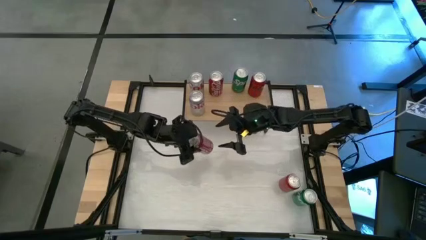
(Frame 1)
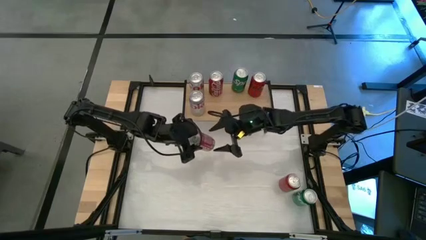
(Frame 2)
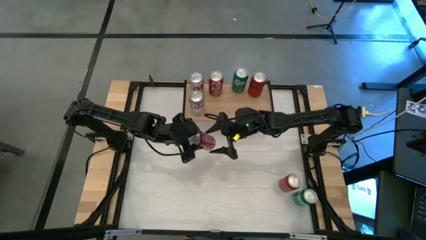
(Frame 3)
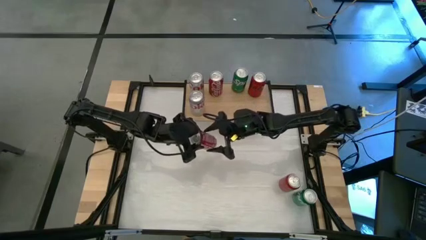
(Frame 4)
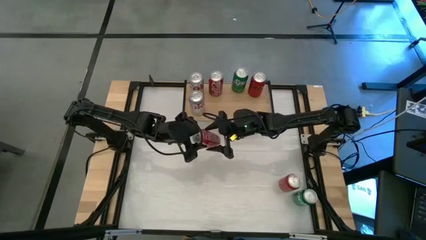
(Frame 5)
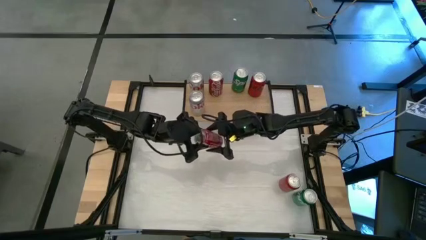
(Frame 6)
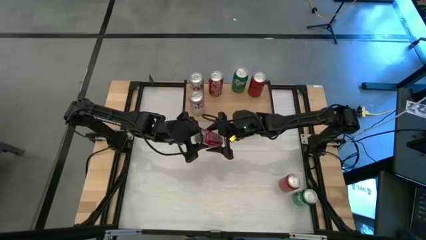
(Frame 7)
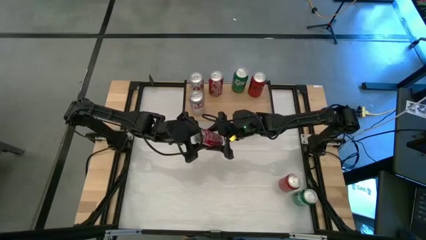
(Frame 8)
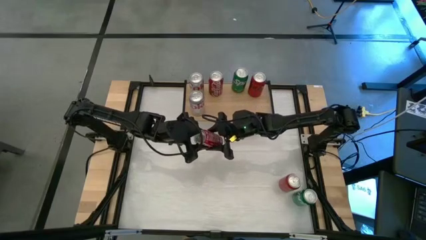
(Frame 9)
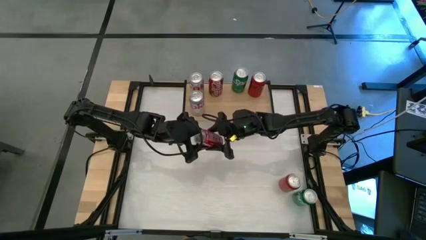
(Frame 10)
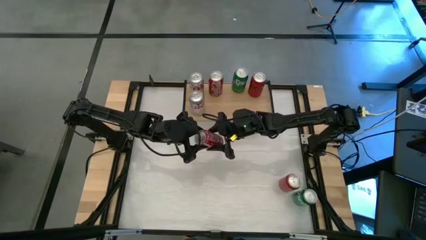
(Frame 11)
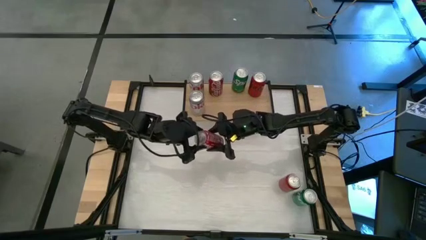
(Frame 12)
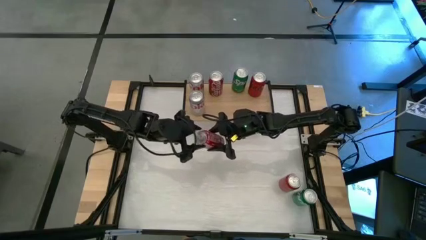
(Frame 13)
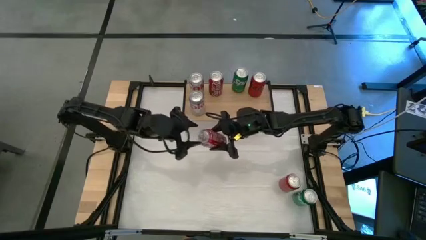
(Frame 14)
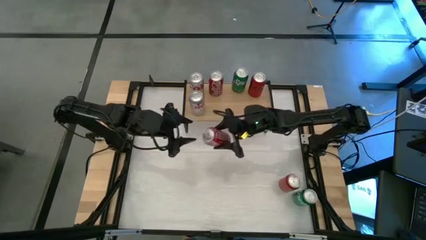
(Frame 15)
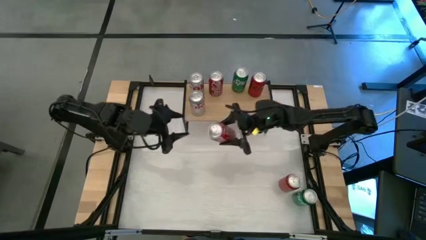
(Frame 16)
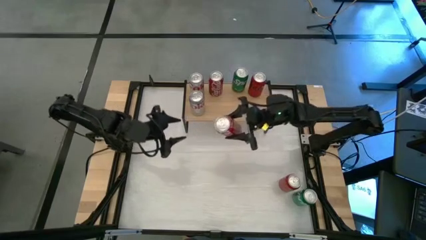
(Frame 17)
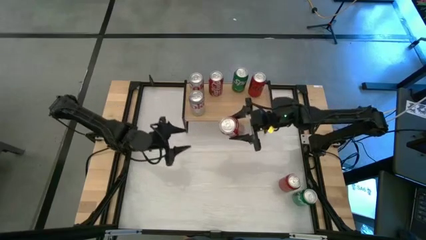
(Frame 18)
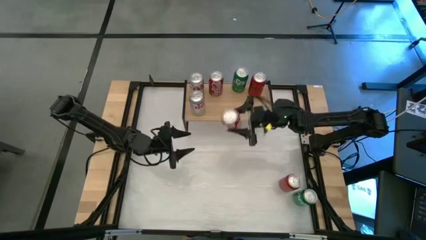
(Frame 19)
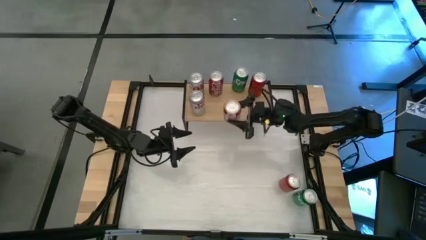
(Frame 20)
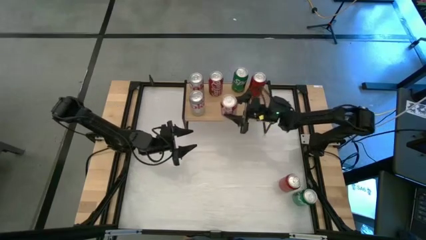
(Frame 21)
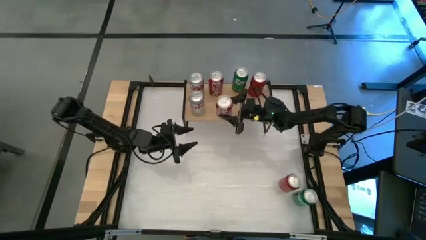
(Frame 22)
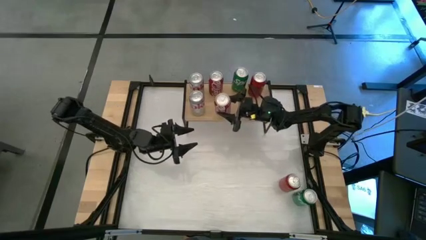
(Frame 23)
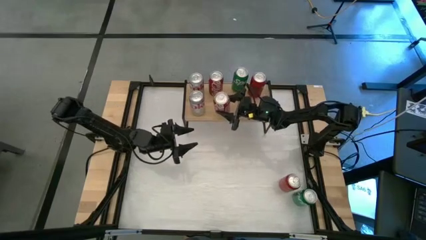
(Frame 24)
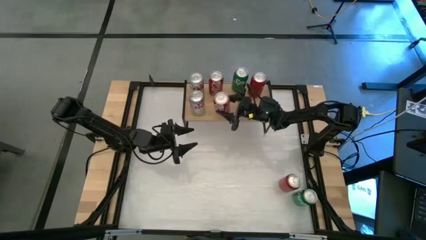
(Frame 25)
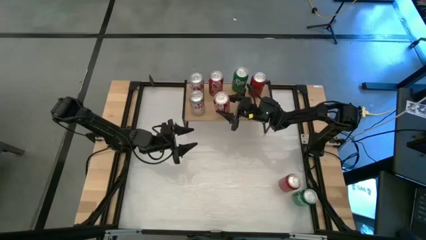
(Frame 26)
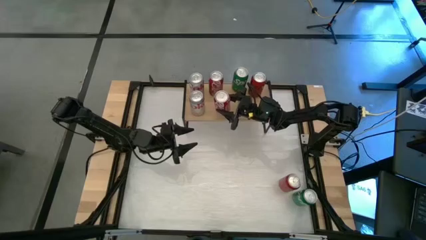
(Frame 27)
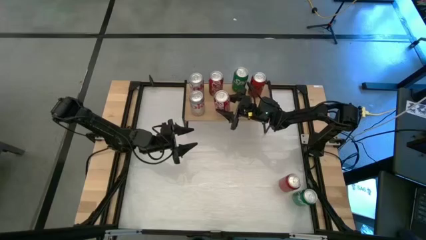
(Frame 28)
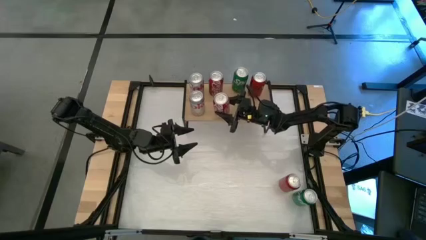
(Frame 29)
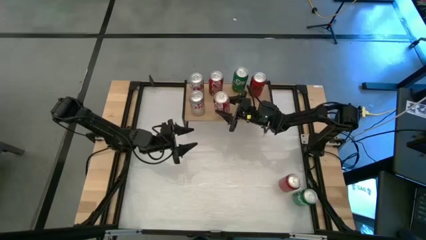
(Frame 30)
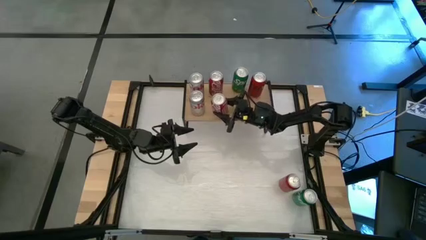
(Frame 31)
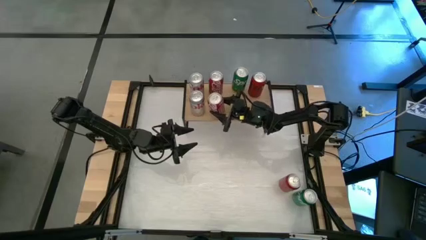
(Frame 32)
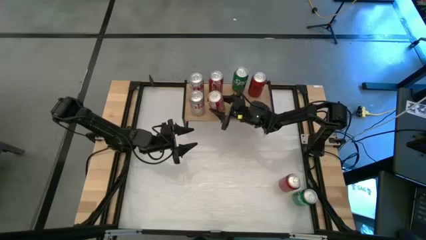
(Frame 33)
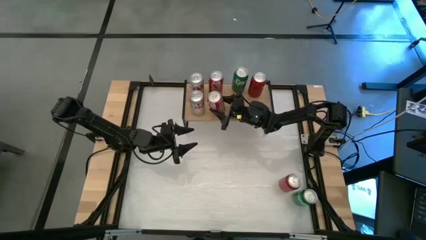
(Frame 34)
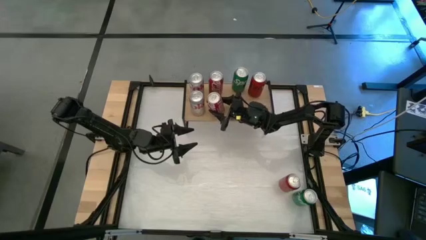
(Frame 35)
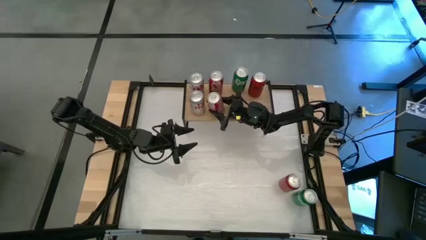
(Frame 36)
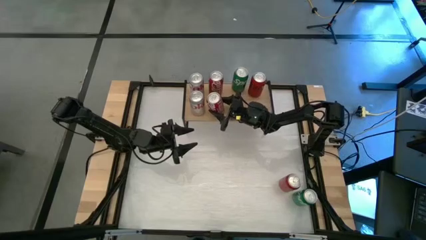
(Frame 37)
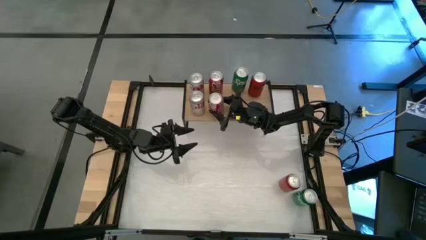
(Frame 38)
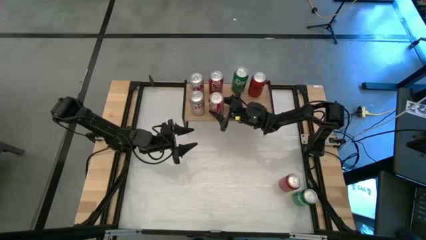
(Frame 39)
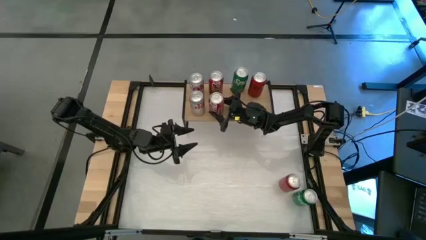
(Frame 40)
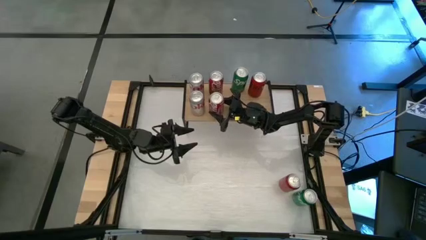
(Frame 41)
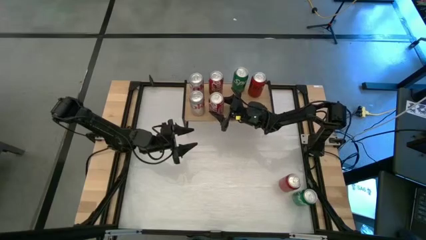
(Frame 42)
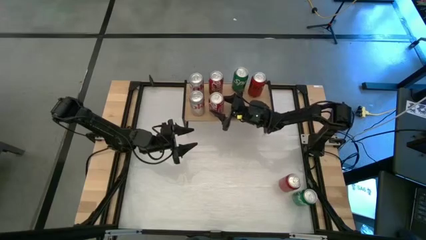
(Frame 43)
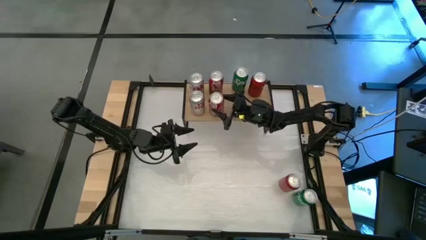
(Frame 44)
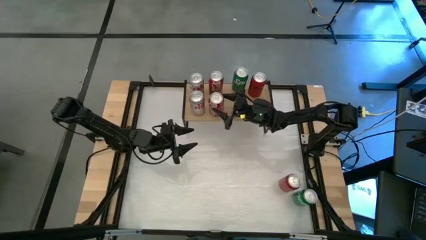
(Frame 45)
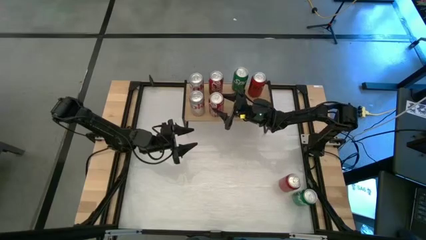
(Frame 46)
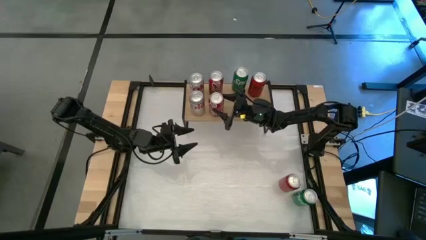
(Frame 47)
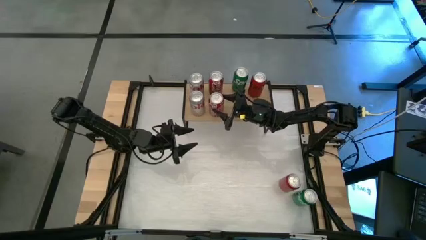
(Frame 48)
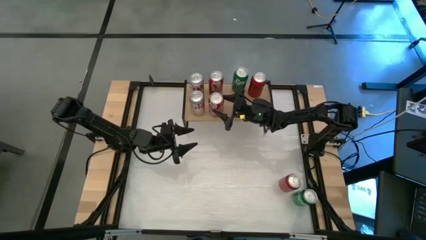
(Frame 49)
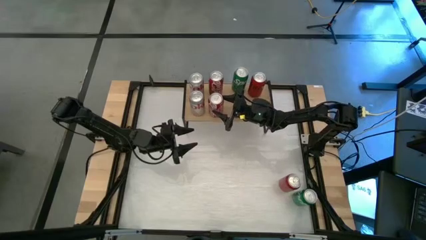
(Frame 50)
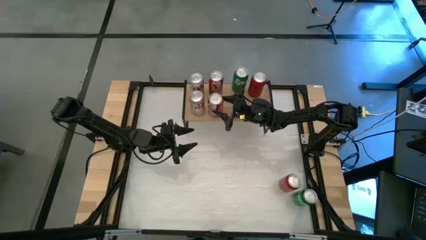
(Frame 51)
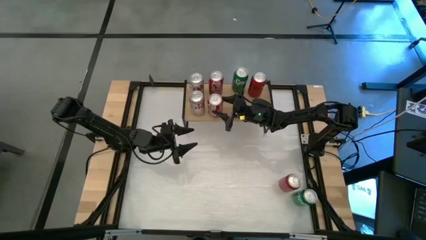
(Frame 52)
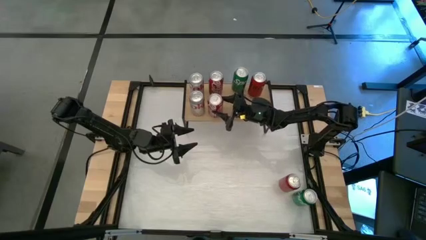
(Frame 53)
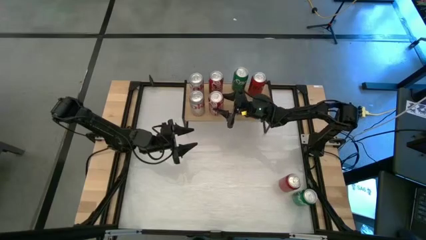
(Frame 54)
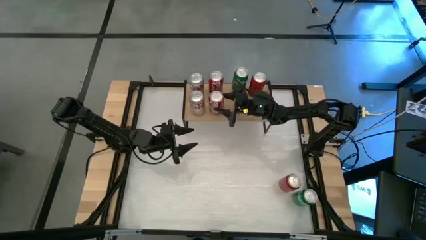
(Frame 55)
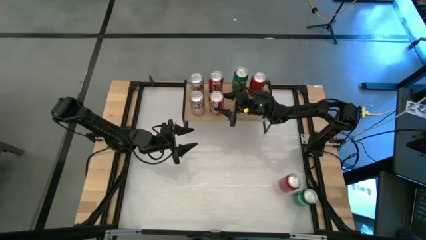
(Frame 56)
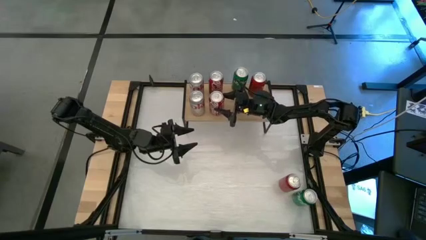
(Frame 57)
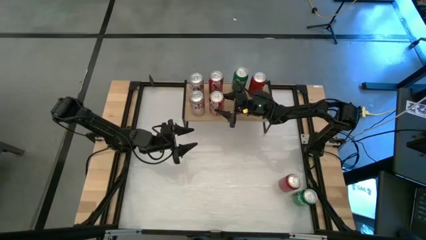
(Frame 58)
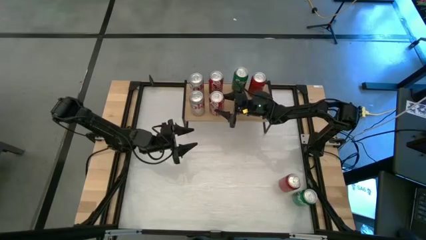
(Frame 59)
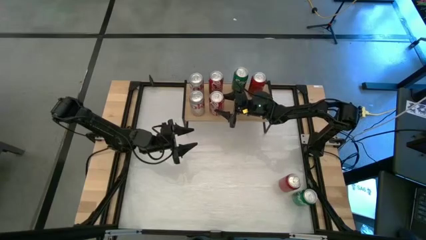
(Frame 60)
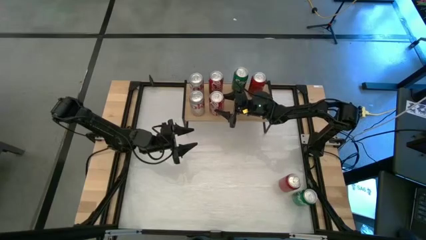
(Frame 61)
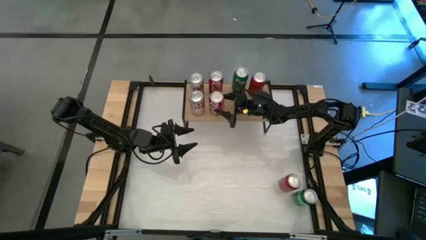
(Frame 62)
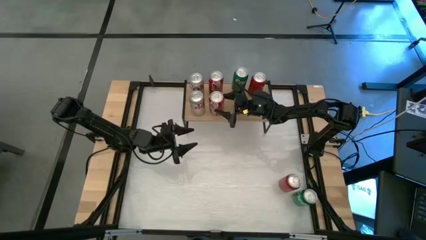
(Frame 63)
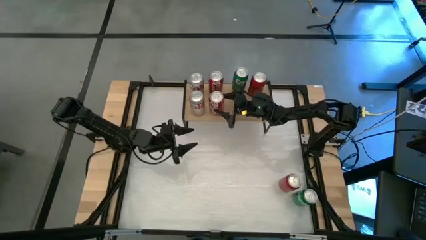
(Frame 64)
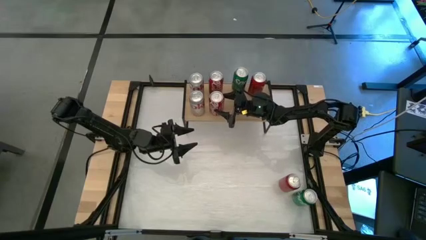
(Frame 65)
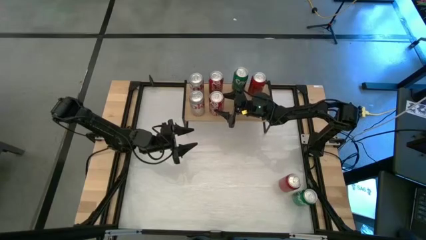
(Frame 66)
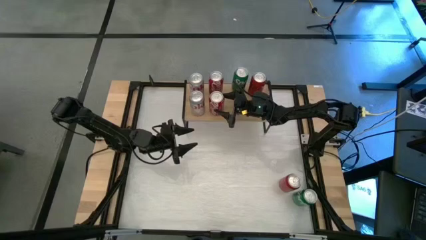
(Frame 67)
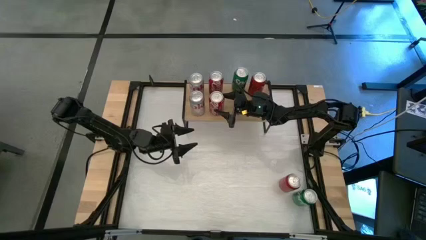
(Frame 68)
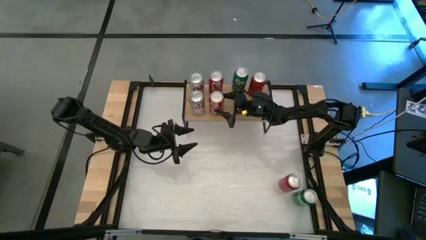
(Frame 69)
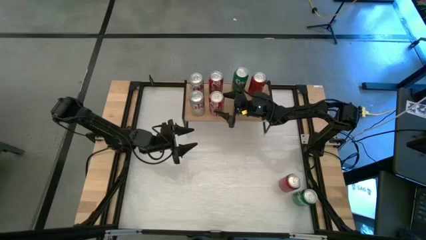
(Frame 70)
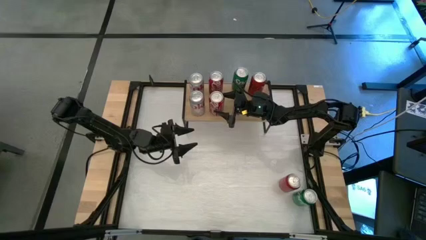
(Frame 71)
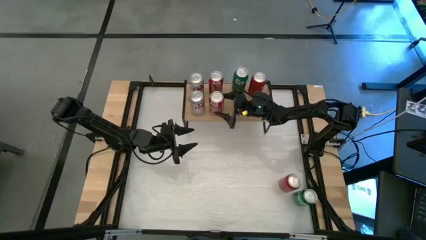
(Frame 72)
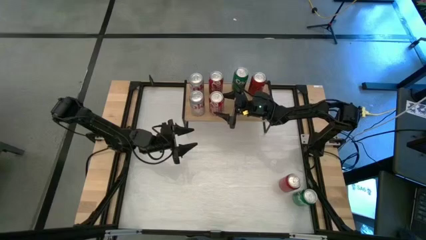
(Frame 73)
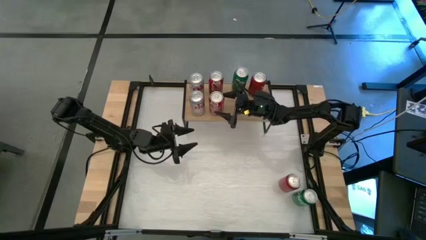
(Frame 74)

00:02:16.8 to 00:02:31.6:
Task: Place canned beverage on shelf
Put the red-white soda can aligned with the other red soda can on the shelf

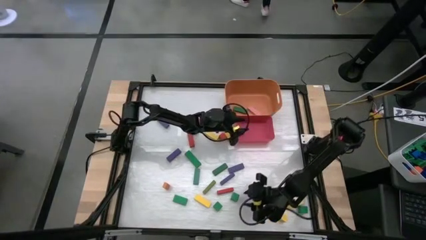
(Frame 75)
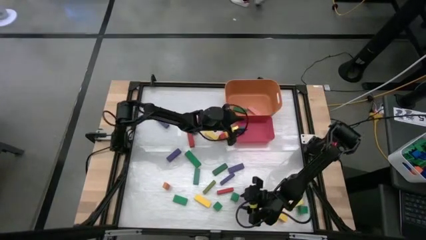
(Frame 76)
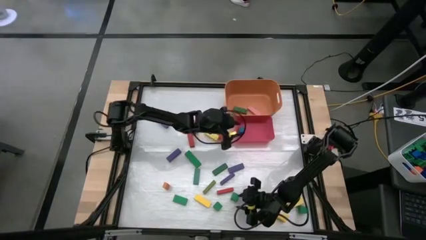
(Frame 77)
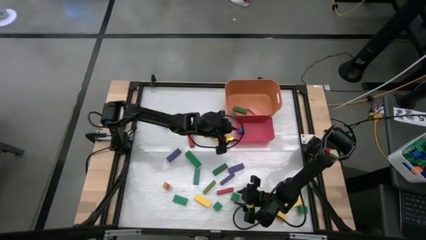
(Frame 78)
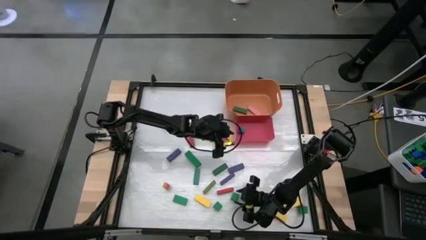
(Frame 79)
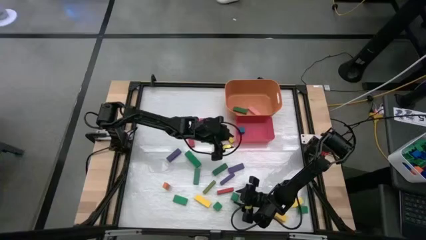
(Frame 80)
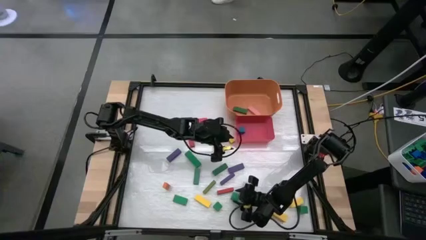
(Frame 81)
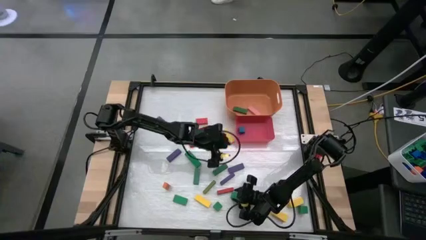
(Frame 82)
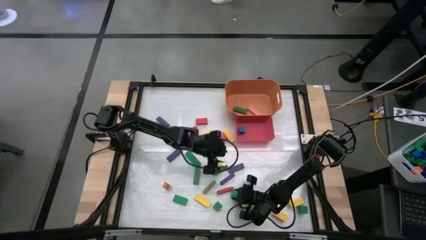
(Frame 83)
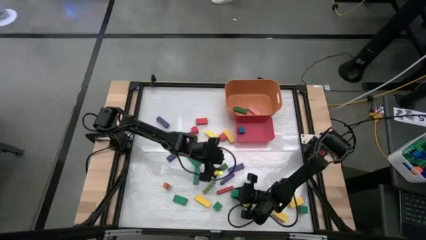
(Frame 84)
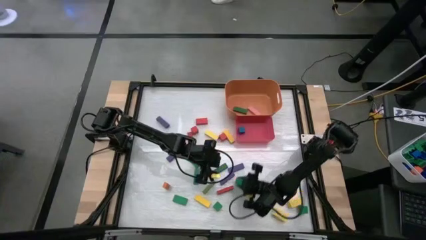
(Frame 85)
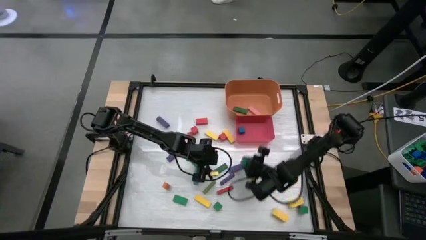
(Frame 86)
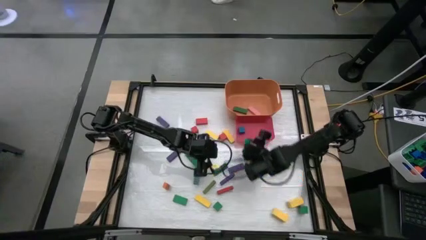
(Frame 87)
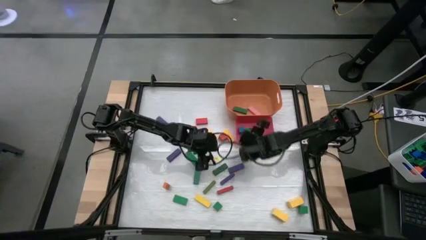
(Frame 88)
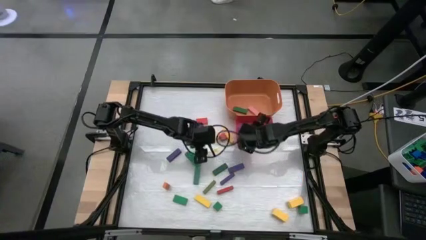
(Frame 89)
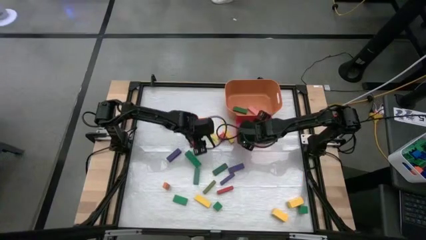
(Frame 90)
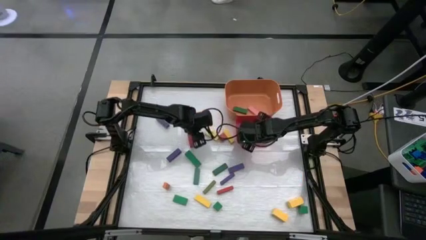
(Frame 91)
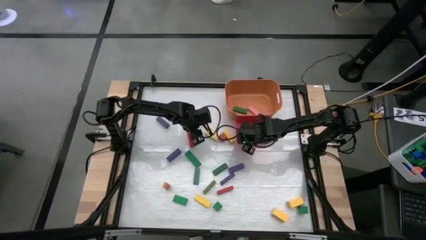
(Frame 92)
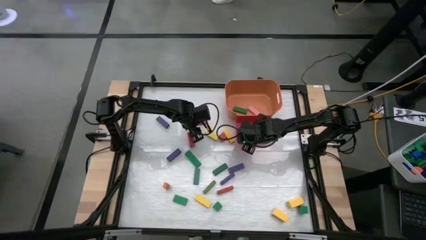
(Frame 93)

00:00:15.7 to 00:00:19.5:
Task: Sort blocks by size
Put the green square block into the red bin
